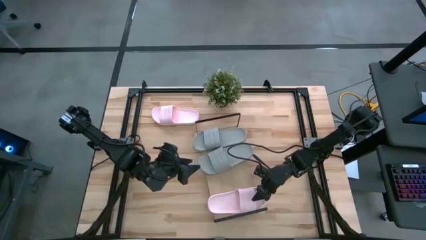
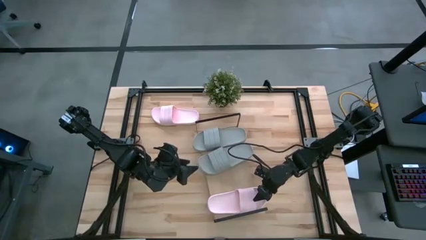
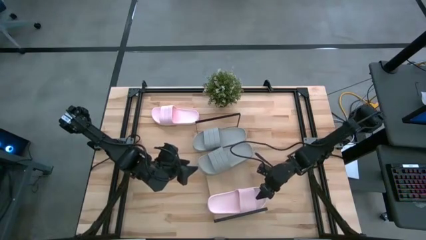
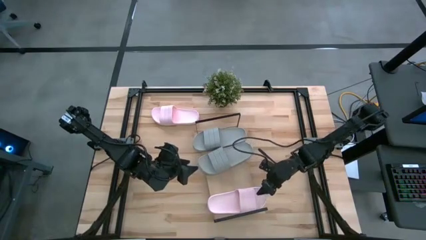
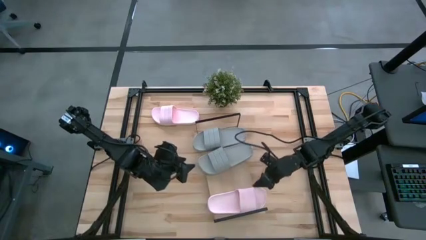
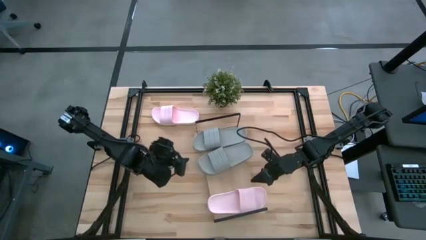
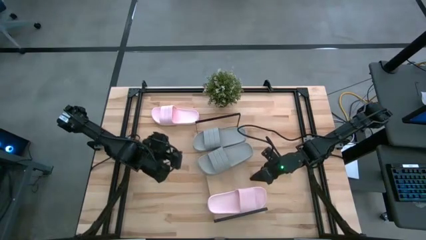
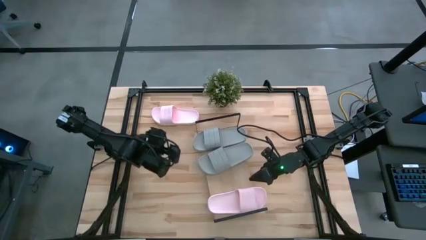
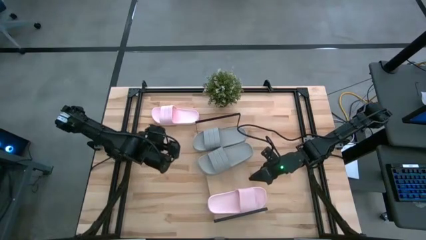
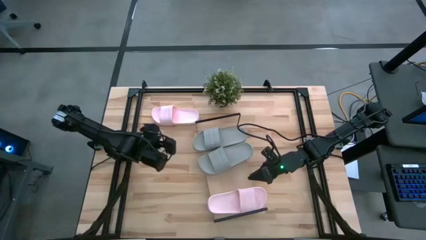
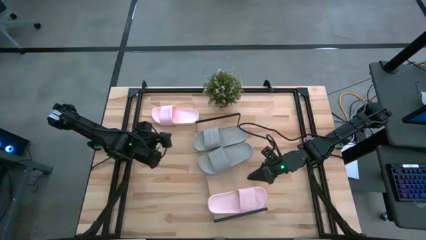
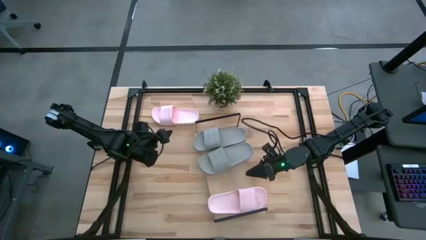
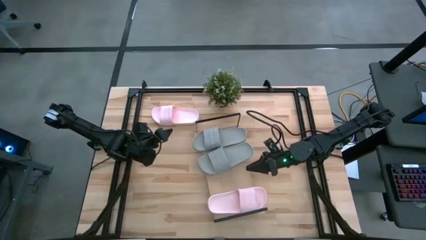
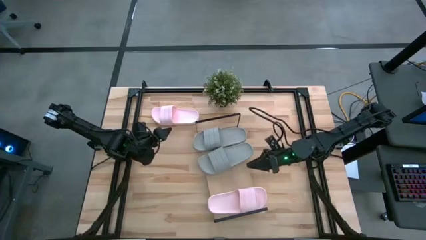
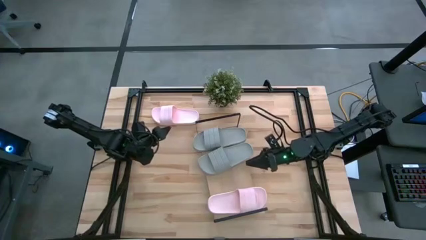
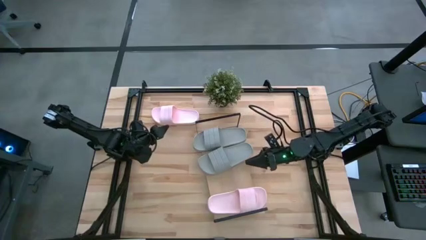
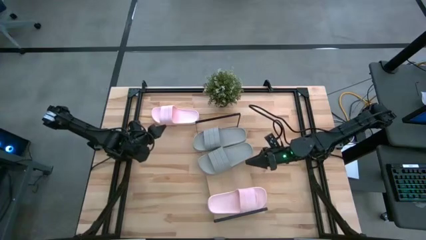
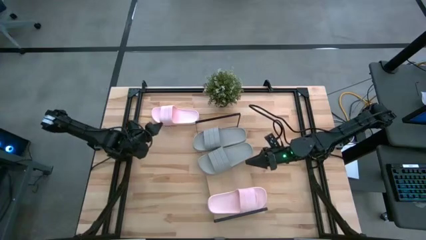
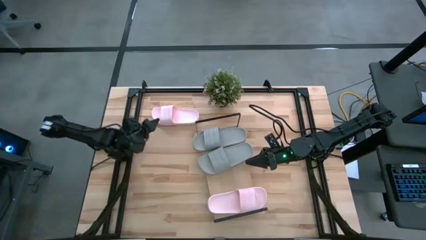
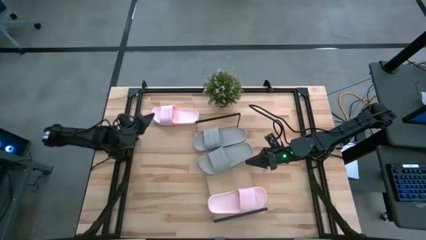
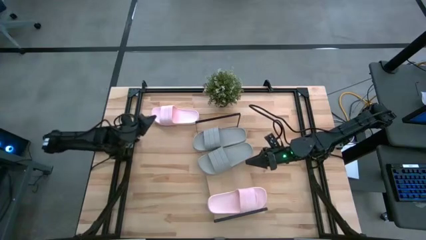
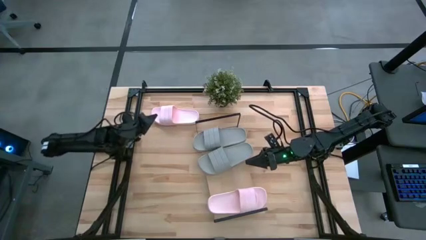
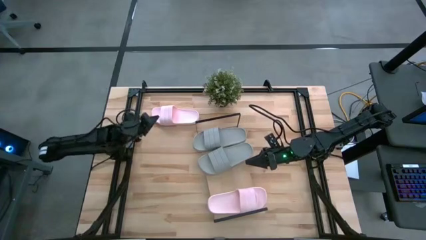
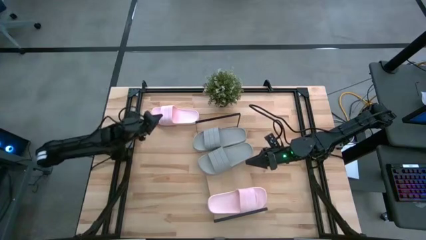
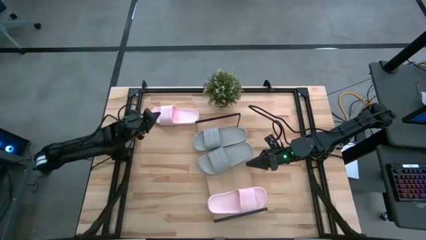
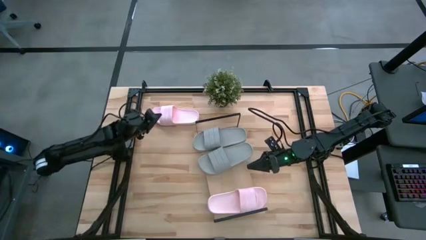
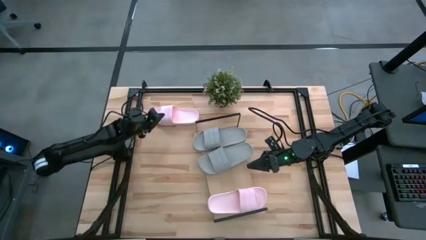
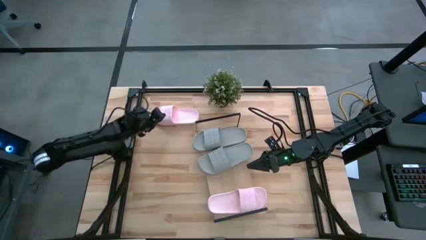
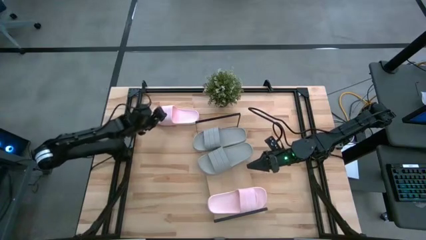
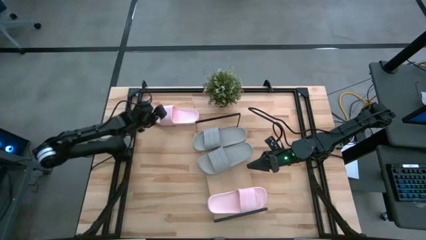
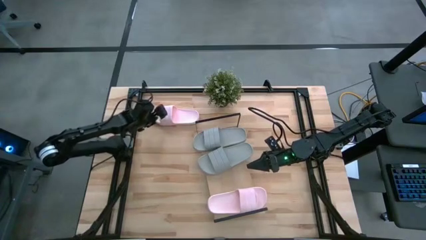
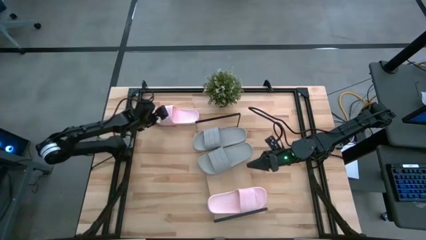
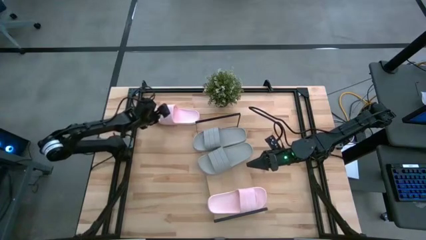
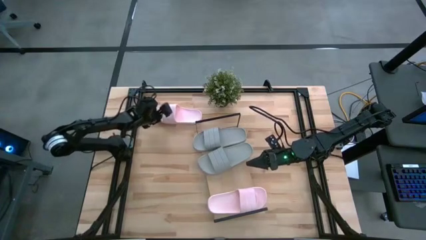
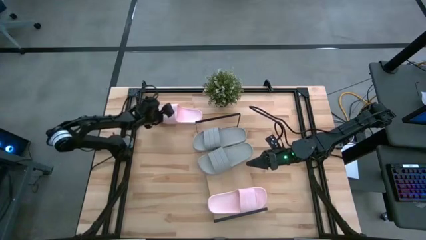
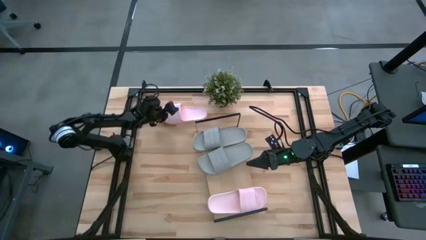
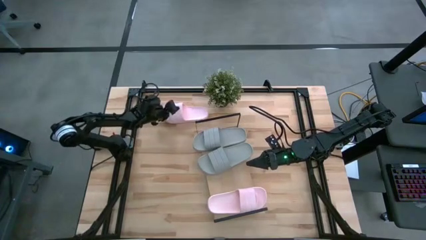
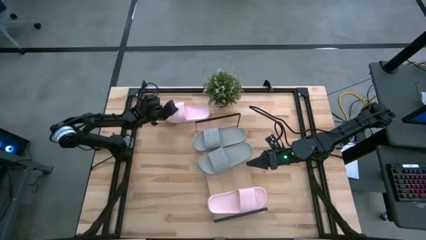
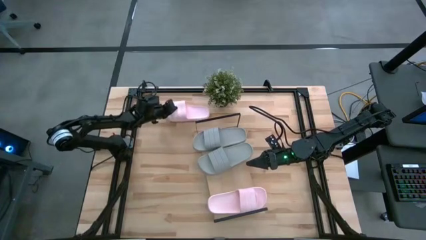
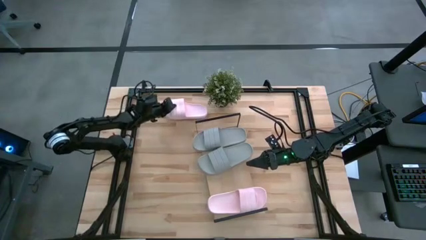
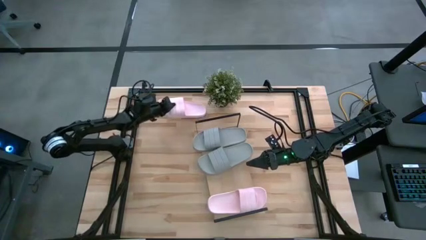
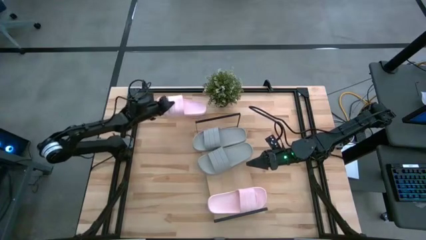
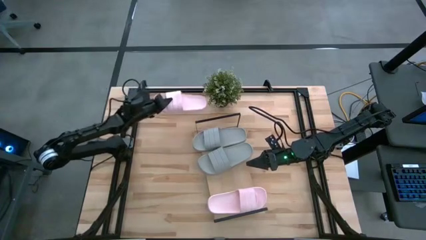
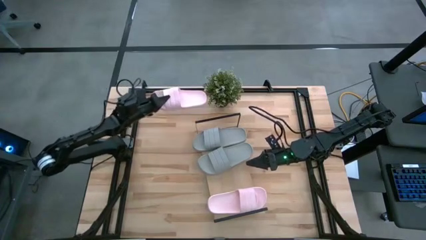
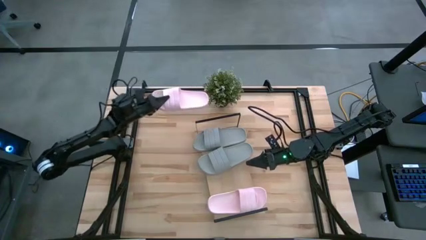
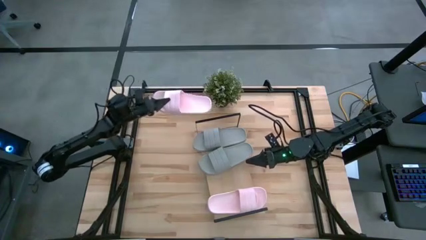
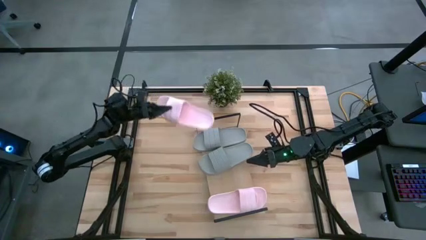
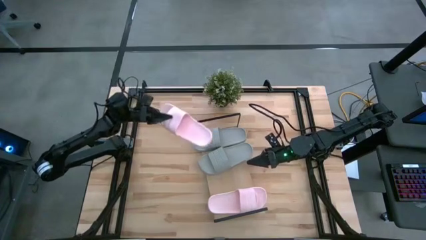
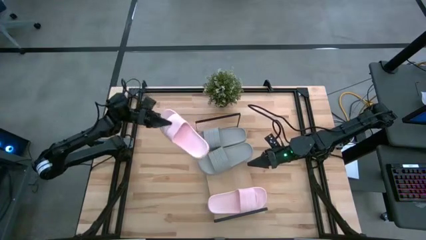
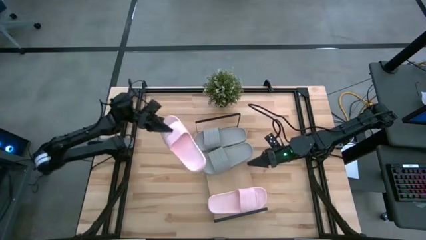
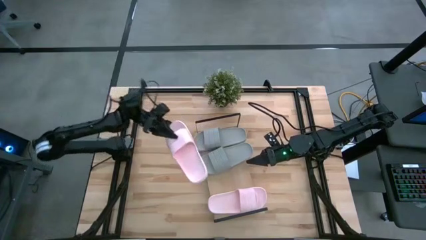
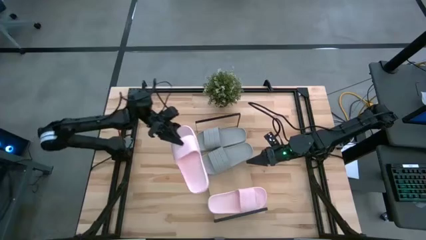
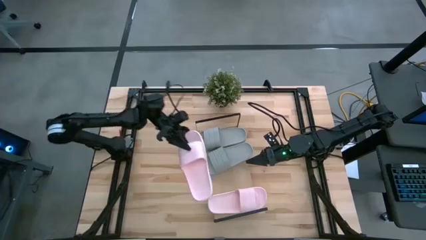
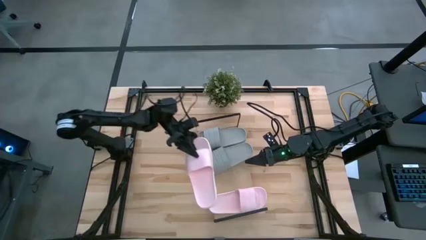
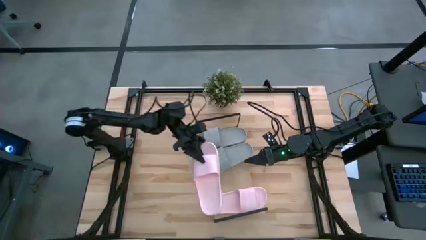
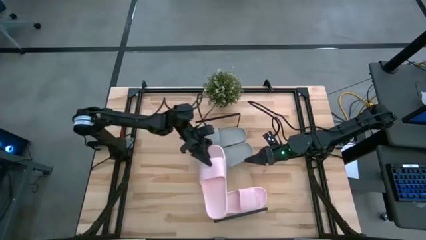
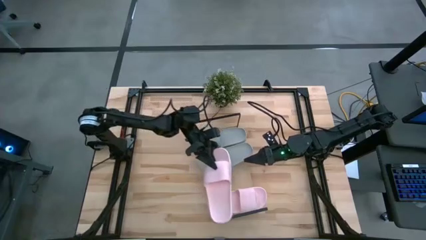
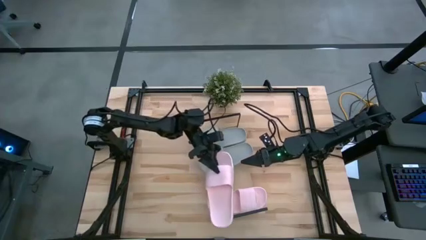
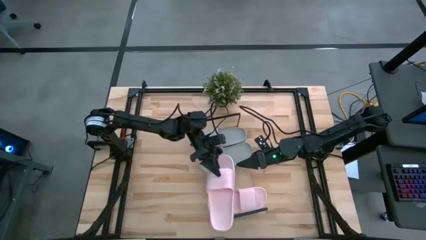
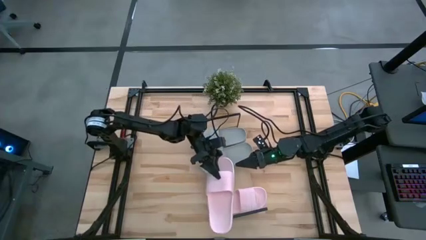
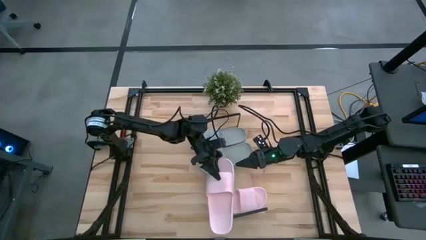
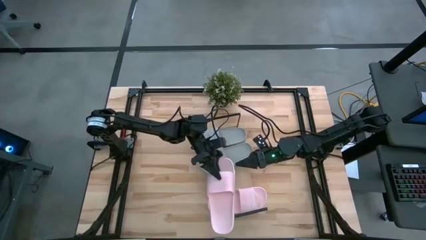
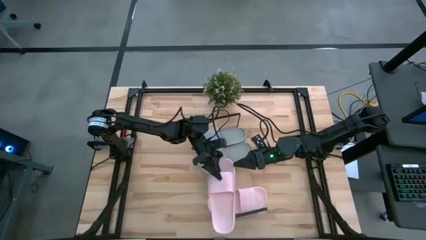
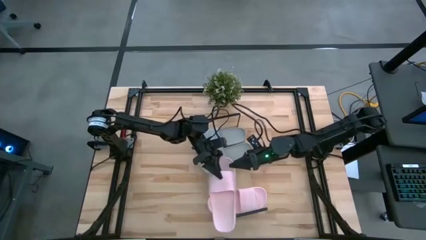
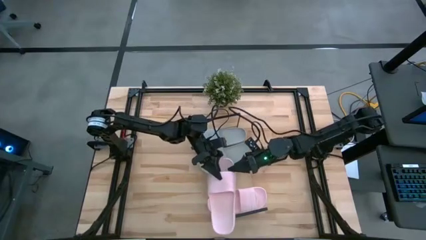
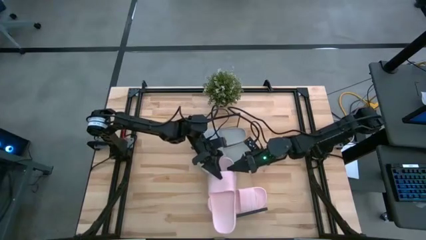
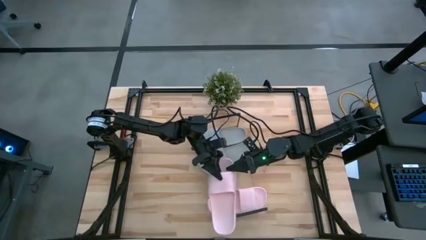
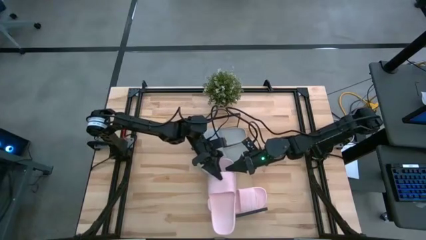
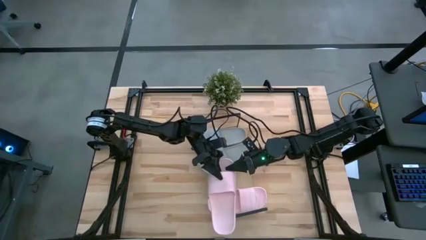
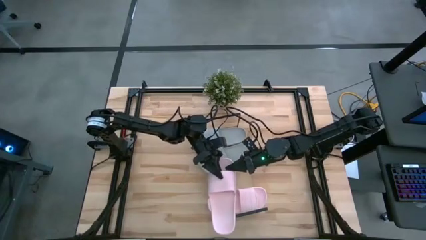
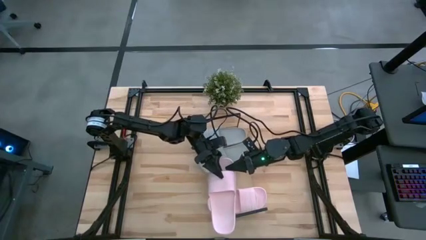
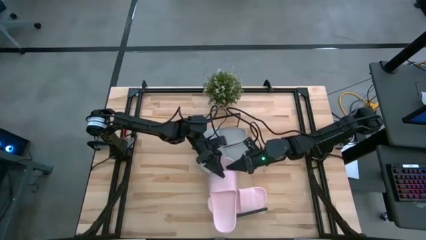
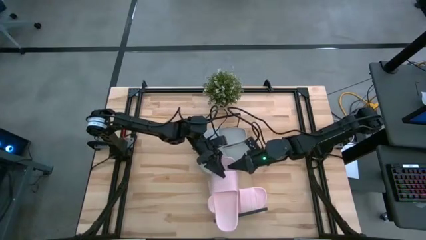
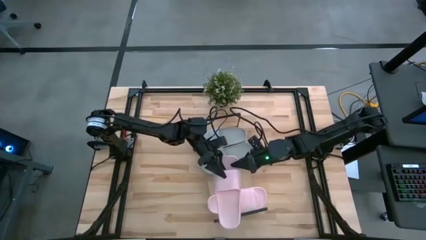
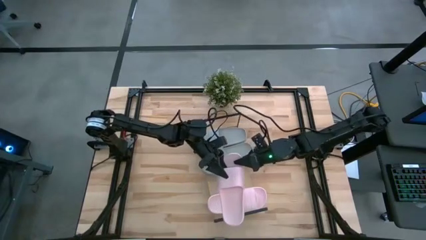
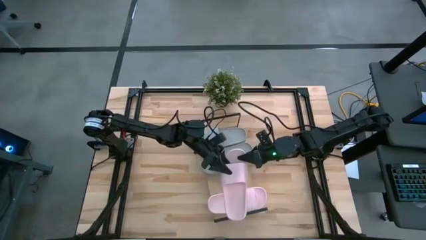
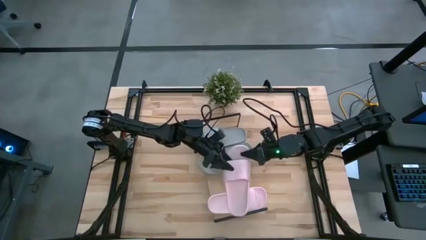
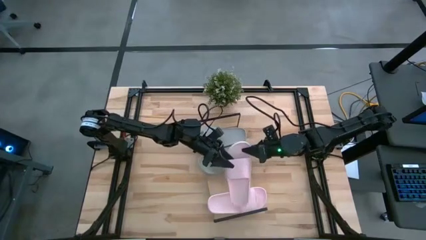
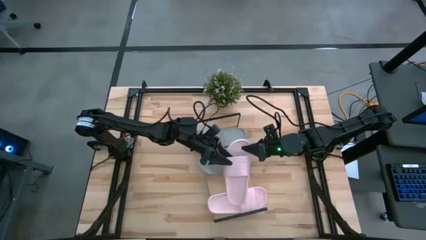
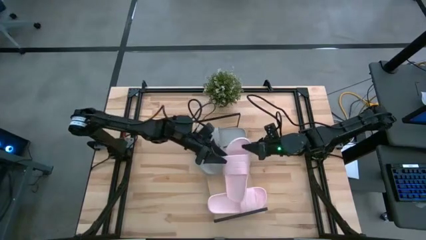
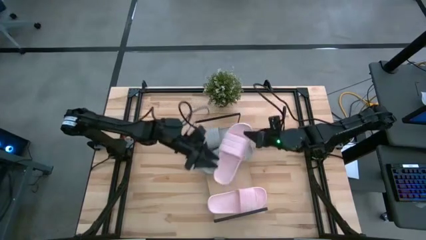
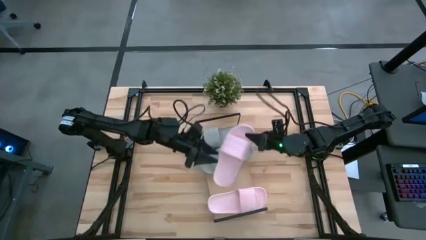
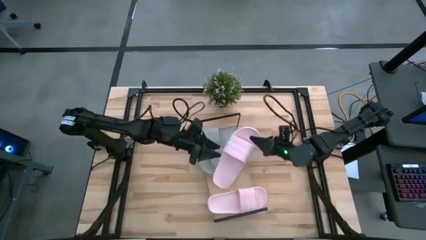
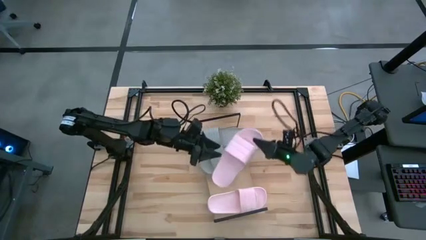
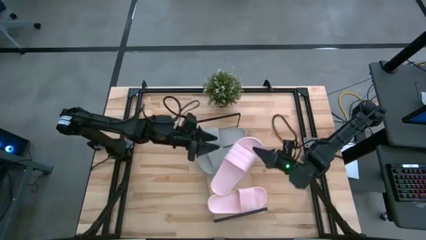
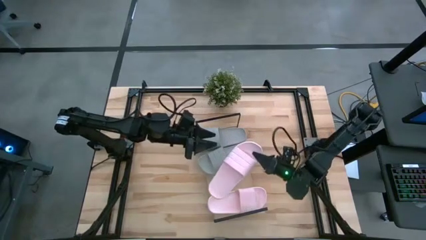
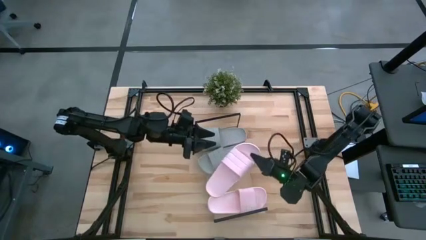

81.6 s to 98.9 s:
Task: Pick and place slides into the shelf
Put the pink slide on the shelf

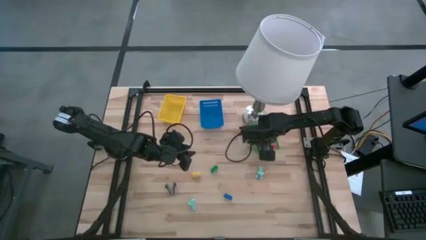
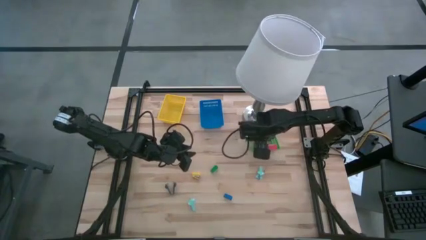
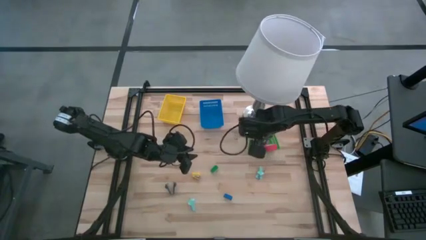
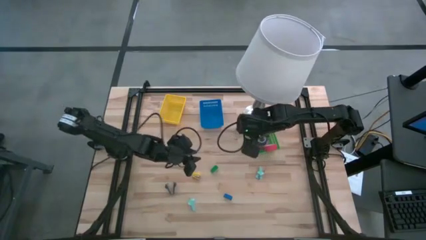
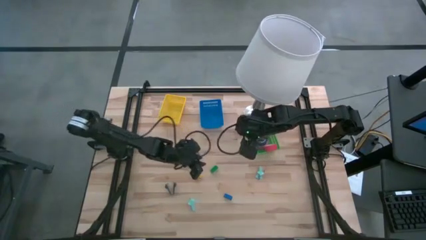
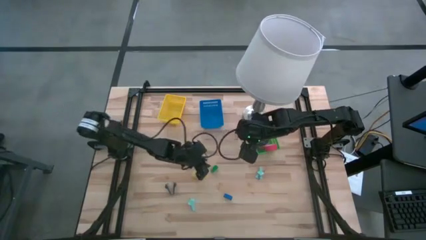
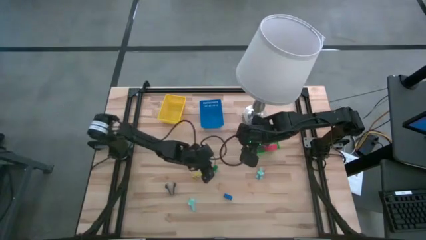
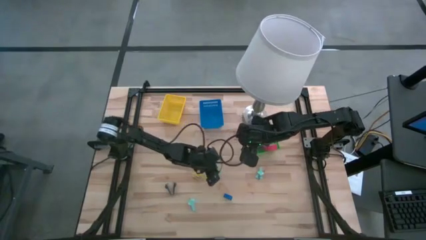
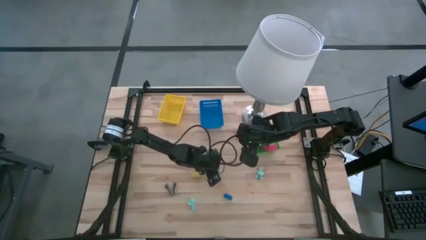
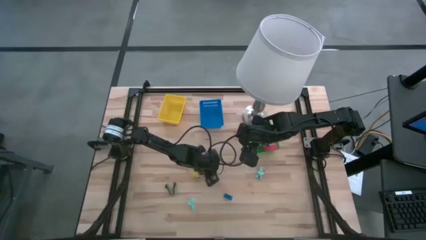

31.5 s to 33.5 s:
Task: Pick and place Stapler, Stapler remover, tape
Put the green small stapler into the blue bin
